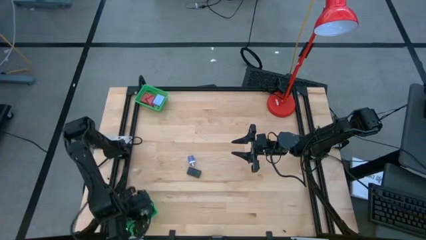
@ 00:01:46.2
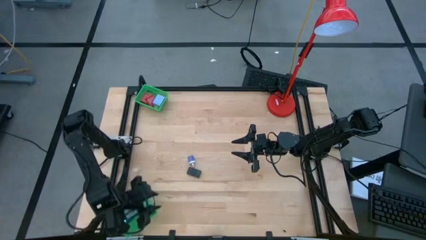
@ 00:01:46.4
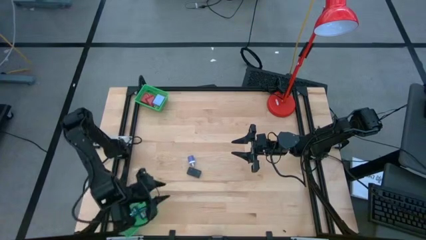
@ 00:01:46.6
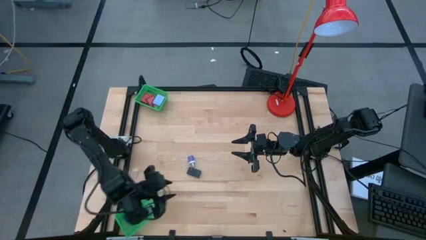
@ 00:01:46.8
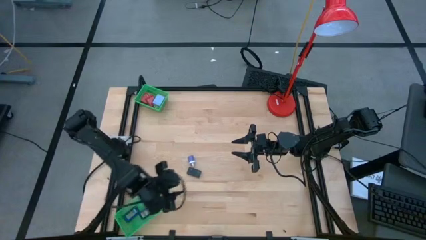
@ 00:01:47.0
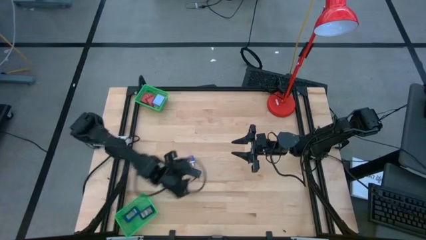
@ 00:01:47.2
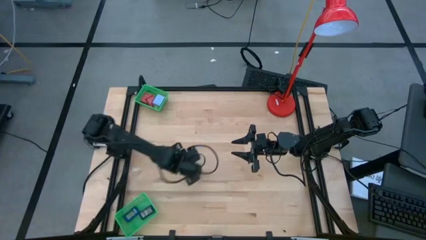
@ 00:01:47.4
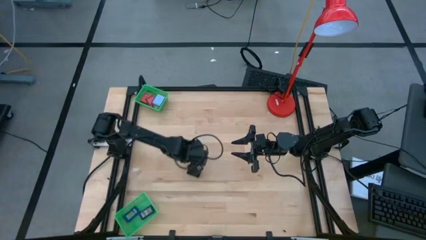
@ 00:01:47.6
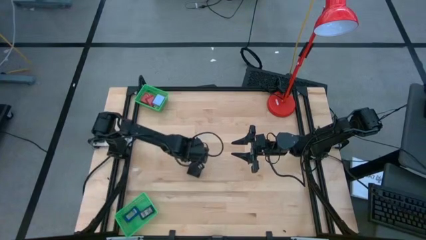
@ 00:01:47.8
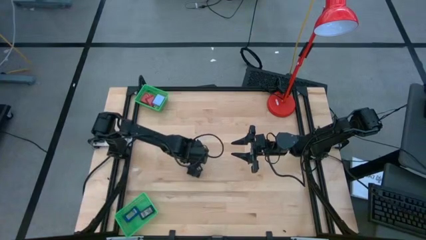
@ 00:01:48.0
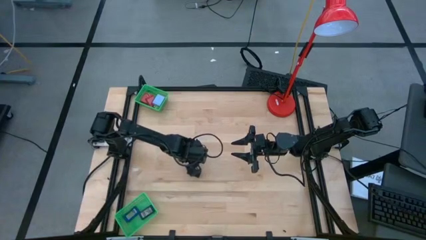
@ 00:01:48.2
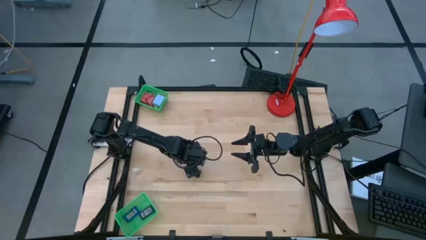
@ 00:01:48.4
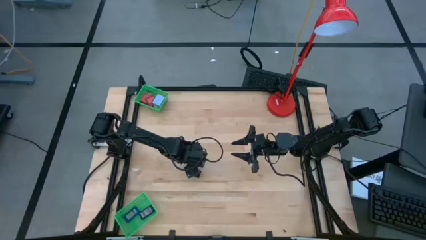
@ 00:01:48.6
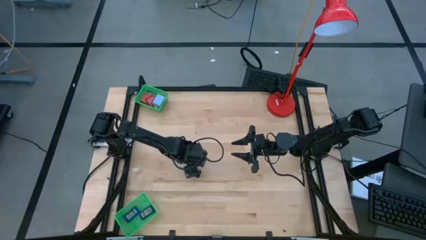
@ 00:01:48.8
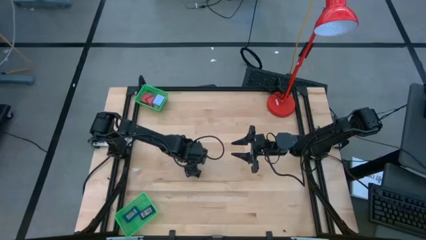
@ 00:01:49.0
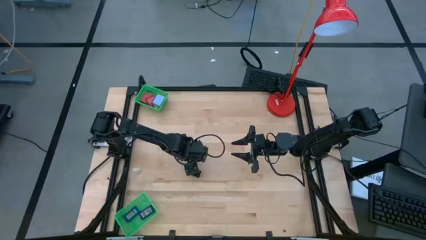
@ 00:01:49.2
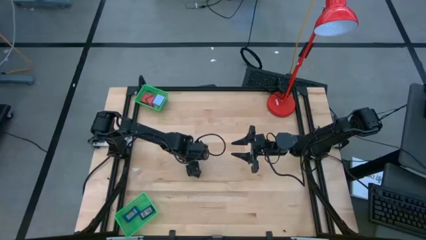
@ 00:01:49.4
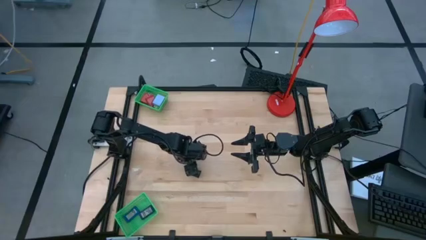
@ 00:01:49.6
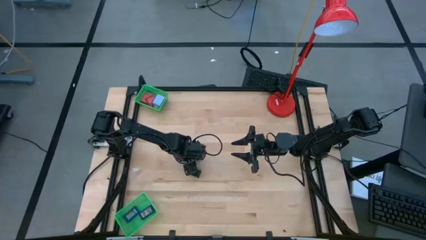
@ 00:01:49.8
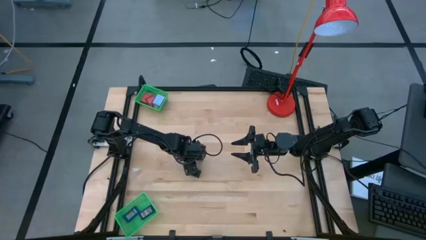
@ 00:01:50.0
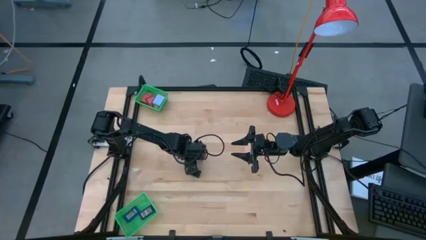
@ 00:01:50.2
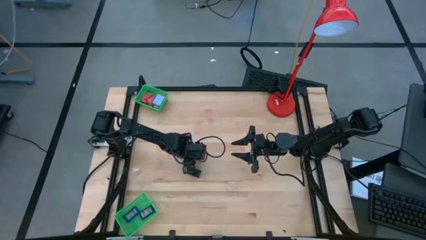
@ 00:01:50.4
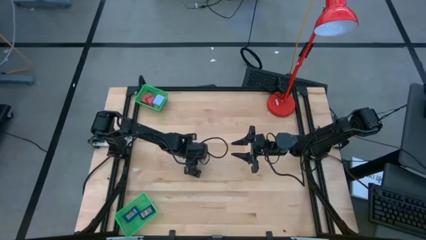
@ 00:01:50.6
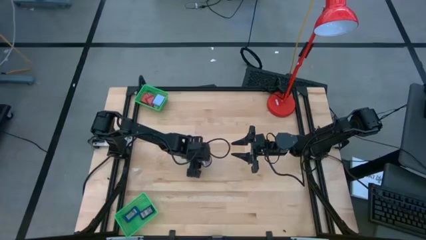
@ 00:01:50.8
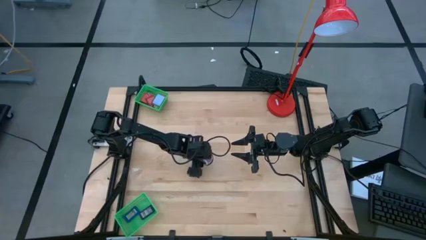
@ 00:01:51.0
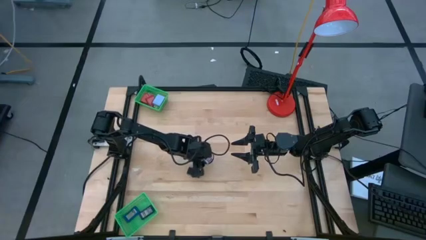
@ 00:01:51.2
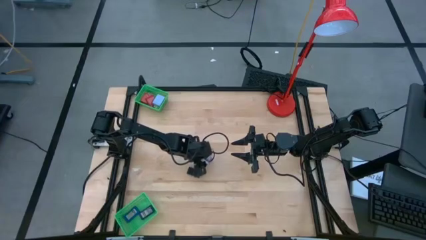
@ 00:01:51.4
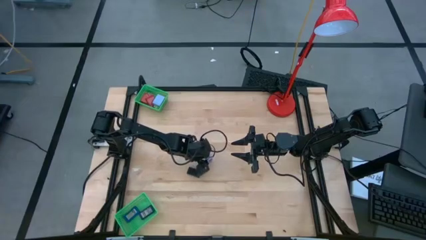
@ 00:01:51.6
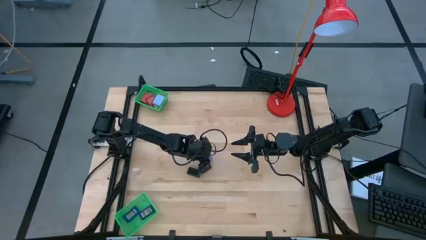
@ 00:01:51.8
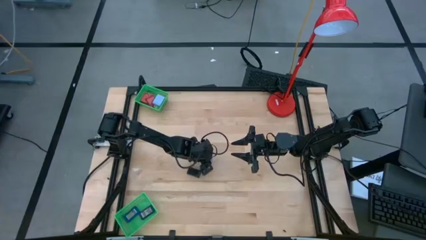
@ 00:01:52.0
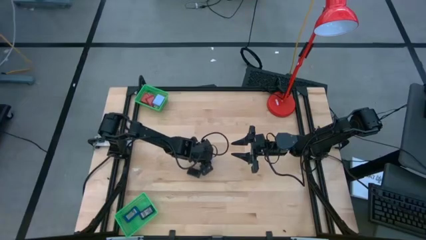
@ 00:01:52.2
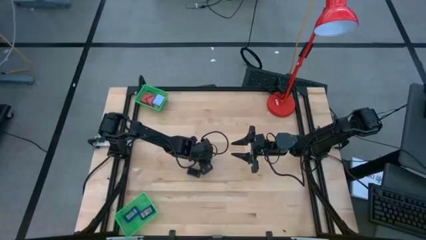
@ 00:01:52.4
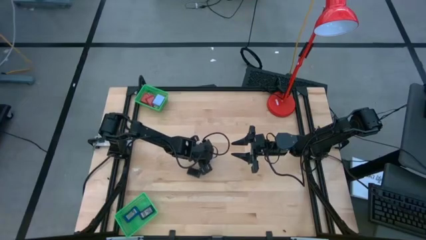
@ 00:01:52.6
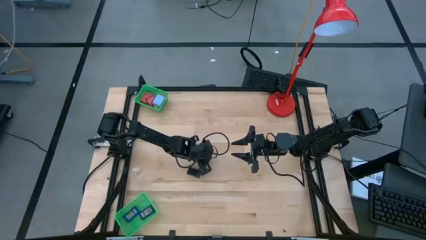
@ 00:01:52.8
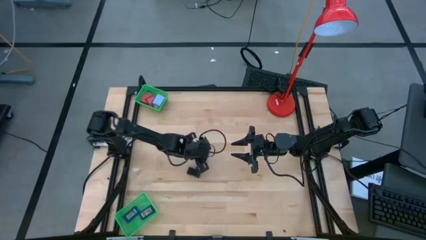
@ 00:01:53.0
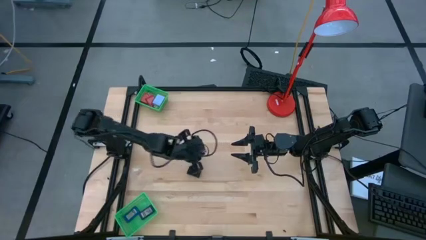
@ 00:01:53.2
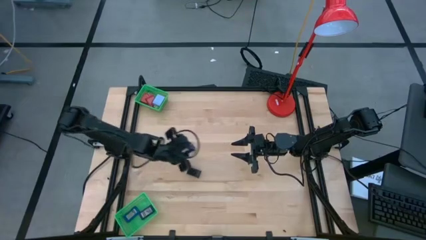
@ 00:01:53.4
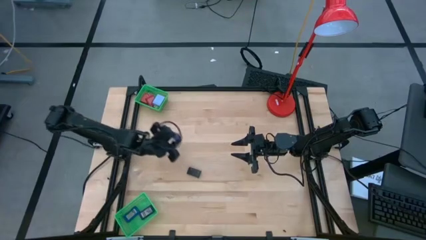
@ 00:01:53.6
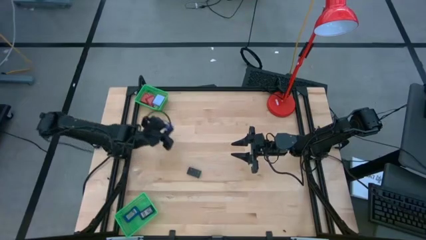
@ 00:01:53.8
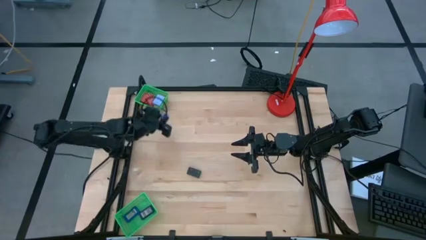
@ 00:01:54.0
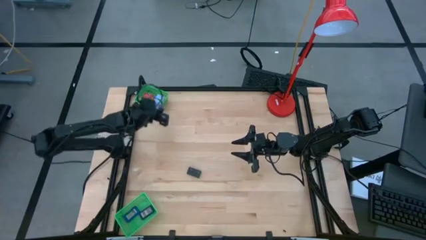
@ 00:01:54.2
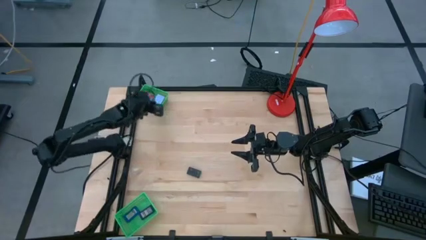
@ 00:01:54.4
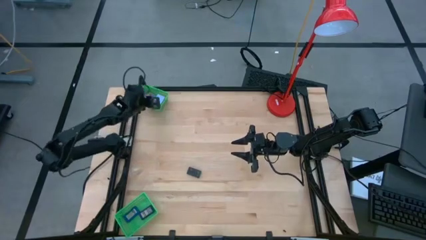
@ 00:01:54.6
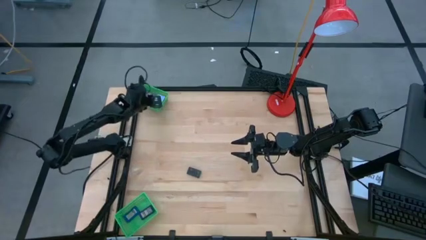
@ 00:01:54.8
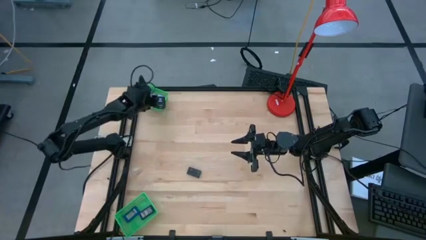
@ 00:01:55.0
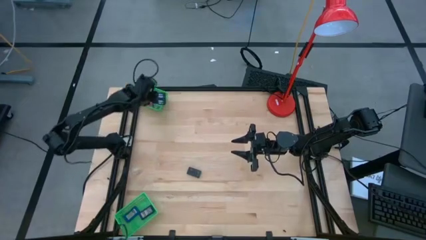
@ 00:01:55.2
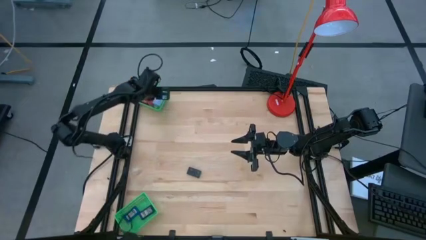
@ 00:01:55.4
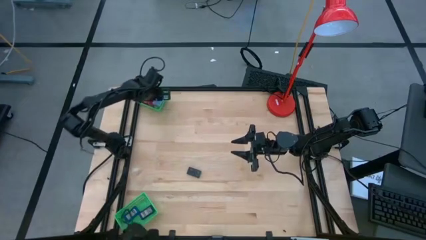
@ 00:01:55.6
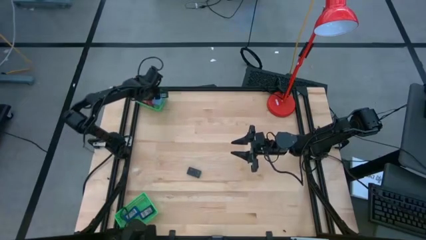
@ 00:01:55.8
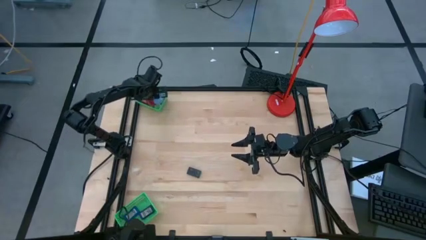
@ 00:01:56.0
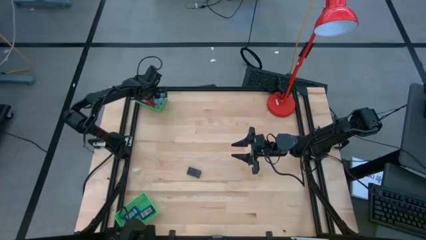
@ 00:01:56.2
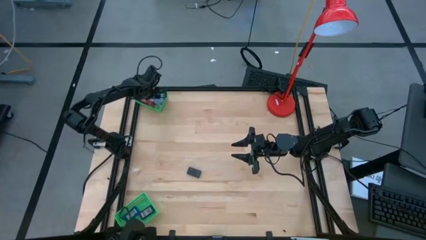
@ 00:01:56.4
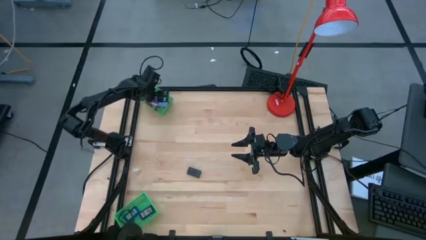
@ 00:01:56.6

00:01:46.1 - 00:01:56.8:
Task: Pick & Place Office items
Put the blue charger adapter into the top green basket

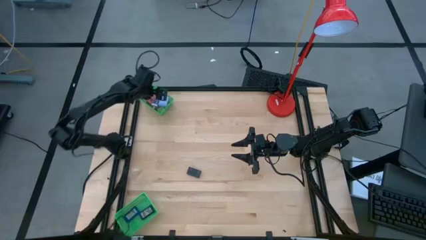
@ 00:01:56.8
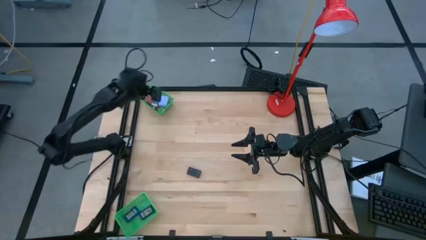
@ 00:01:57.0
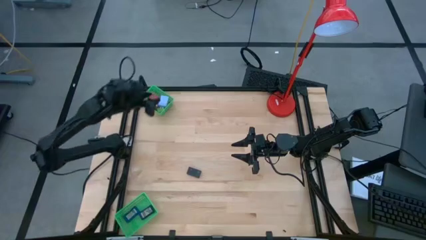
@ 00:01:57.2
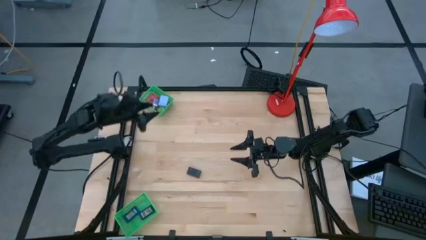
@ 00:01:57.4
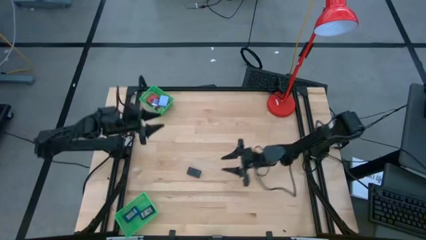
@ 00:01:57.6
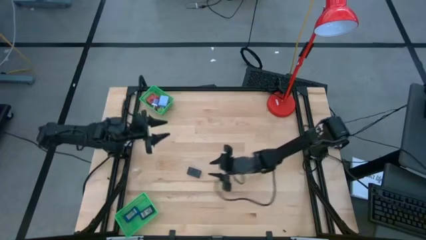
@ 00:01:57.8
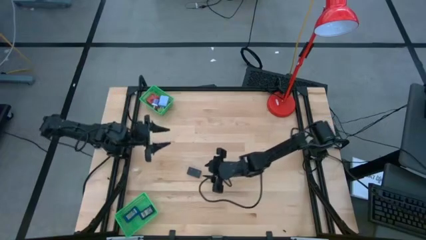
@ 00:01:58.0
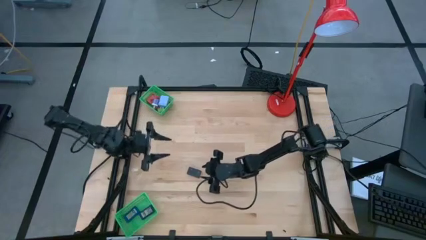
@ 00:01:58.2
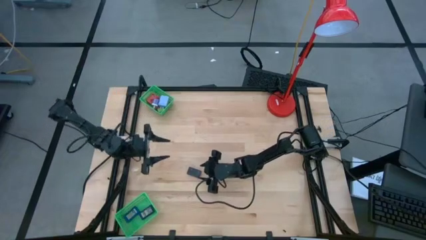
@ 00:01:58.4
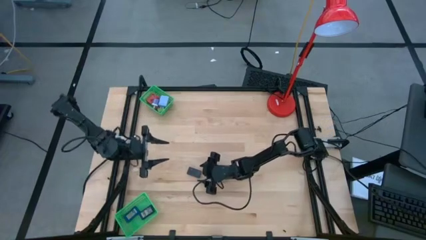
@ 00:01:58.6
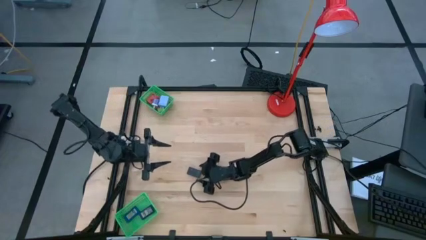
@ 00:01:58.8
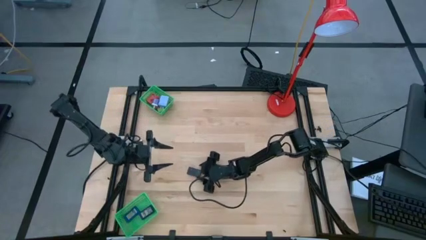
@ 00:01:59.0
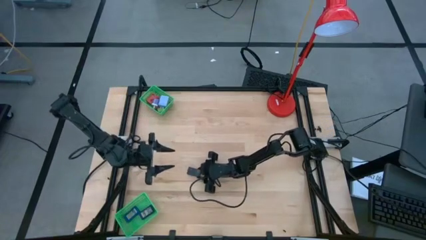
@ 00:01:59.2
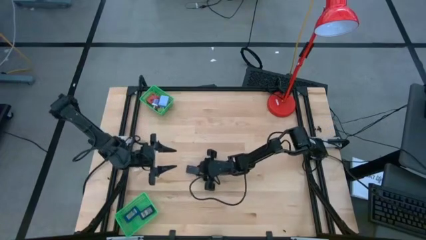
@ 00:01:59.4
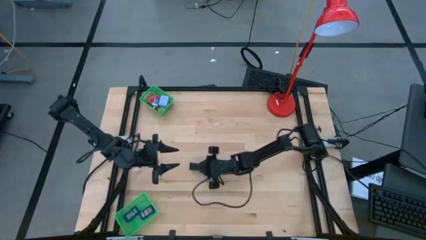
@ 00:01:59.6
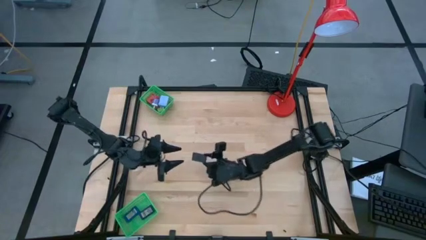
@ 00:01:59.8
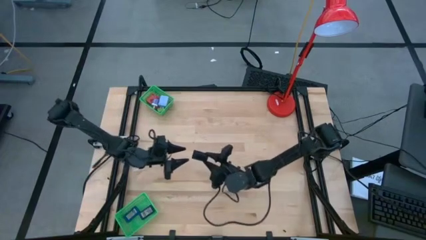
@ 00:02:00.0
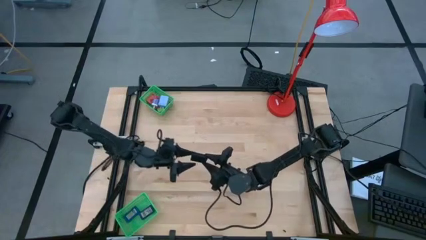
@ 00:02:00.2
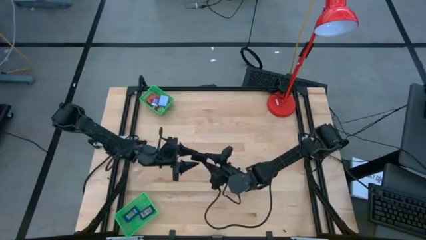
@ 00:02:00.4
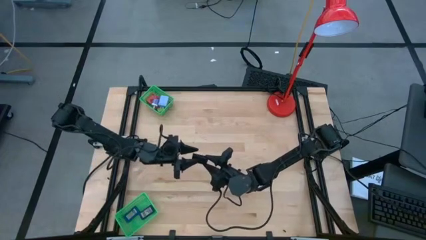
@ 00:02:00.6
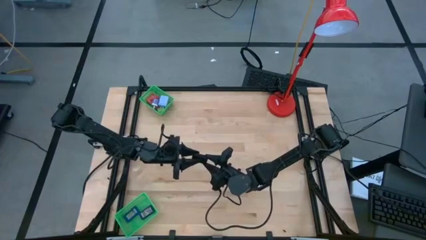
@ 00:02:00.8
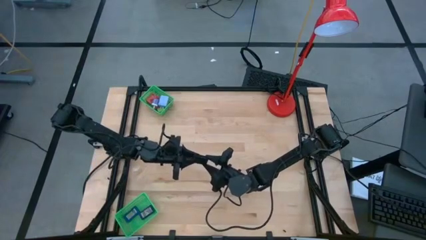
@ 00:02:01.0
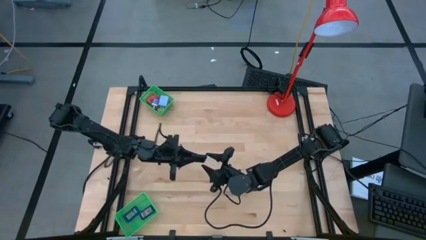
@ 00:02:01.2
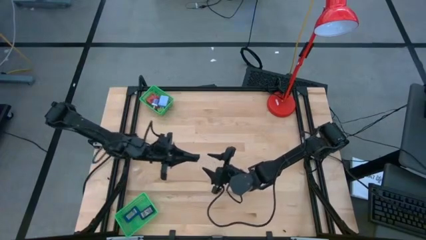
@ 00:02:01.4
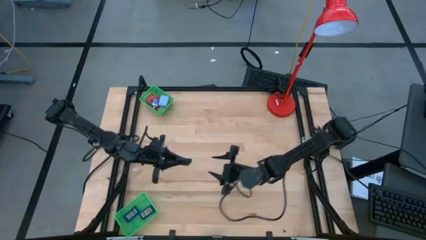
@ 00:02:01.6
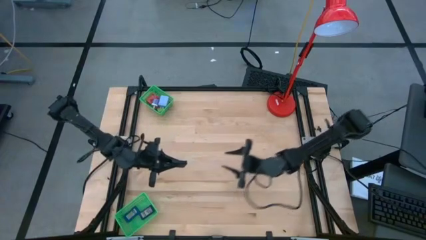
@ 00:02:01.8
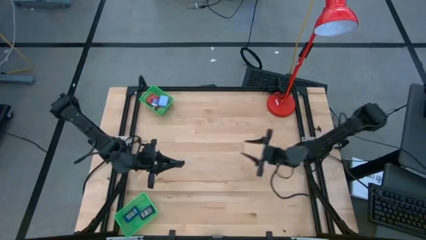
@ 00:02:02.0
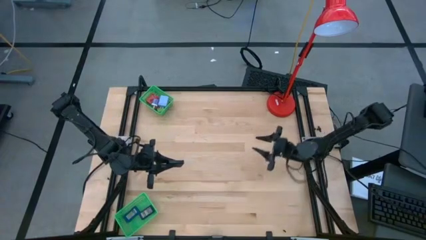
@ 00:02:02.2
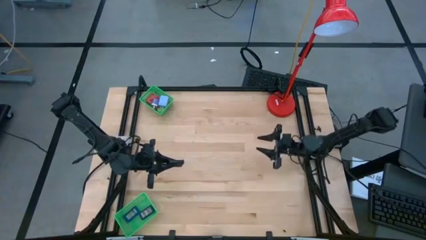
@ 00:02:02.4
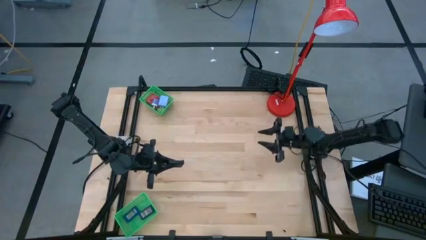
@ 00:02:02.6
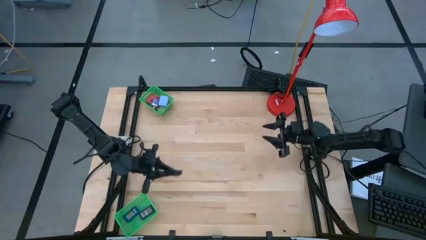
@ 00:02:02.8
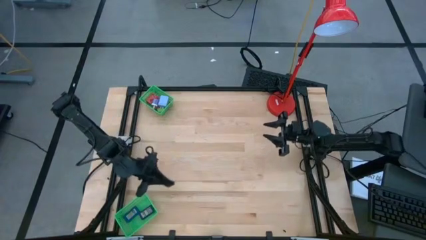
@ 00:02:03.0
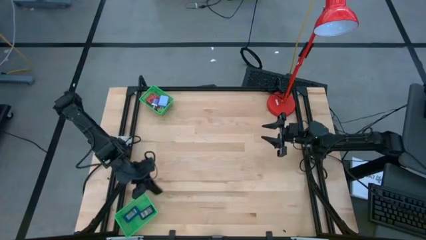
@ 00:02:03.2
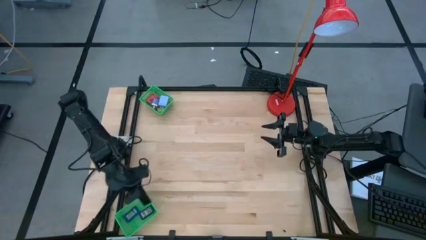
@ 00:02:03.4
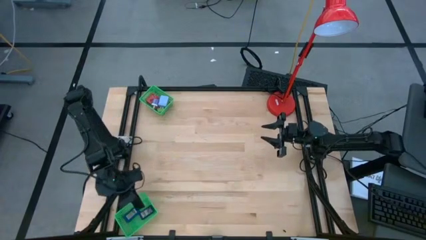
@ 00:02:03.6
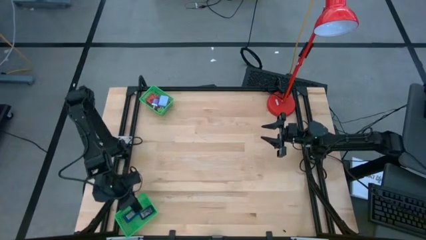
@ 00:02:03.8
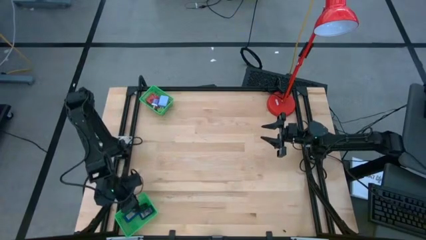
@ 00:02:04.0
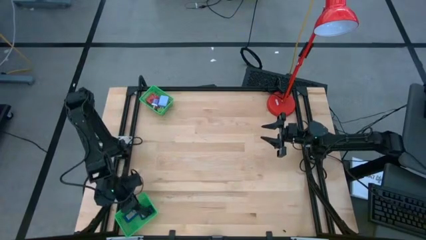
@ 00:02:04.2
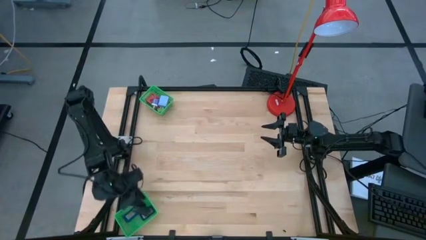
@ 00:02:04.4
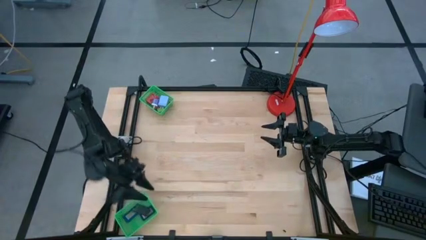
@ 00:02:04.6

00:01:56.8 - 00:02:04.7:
Put the black digital timer into the bottom green basket
